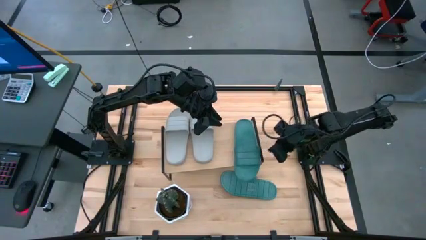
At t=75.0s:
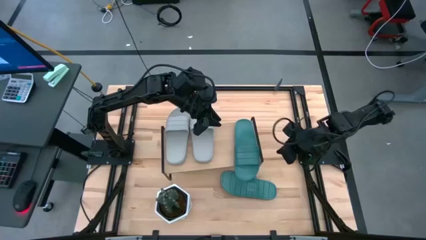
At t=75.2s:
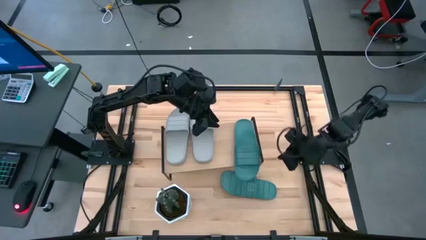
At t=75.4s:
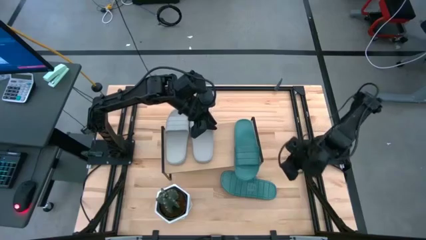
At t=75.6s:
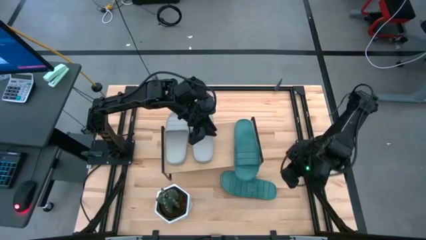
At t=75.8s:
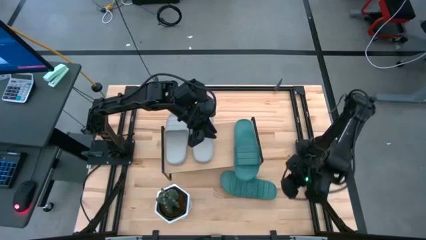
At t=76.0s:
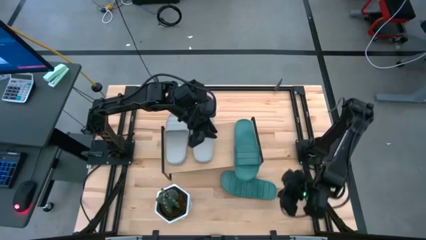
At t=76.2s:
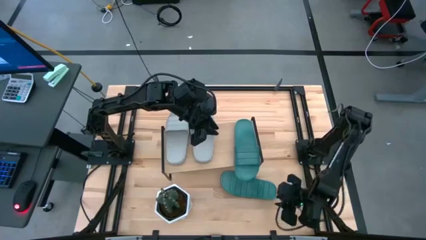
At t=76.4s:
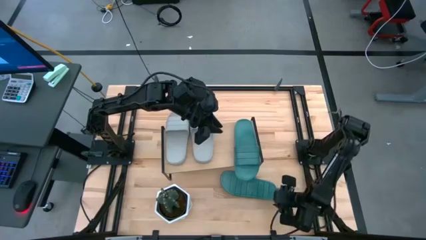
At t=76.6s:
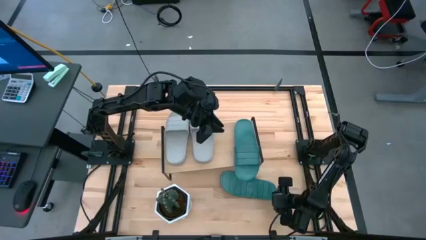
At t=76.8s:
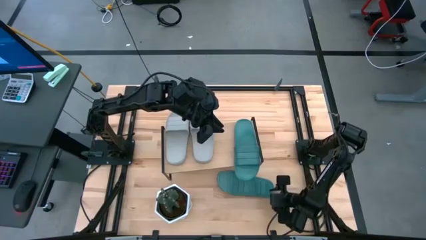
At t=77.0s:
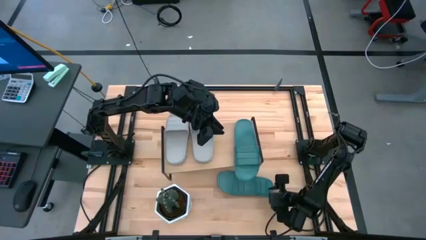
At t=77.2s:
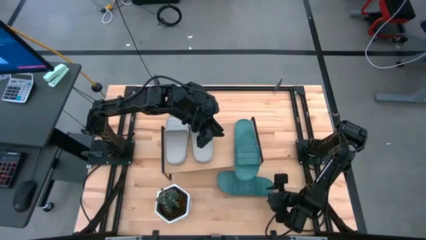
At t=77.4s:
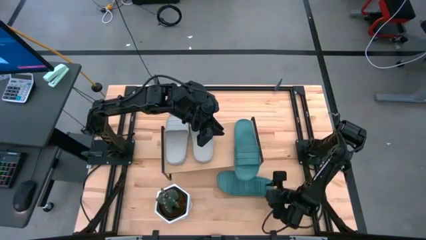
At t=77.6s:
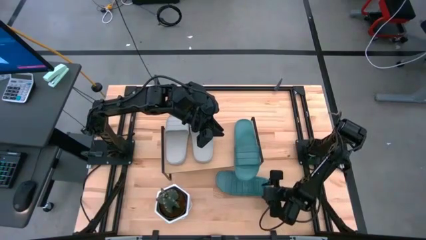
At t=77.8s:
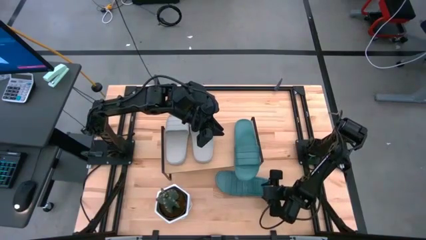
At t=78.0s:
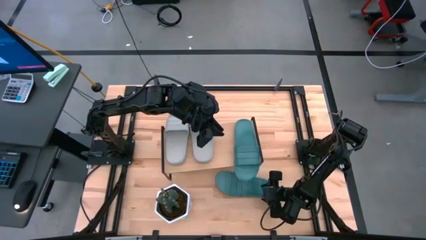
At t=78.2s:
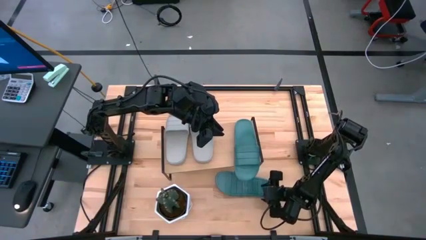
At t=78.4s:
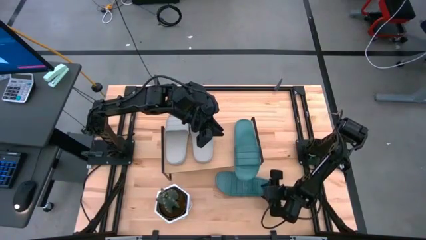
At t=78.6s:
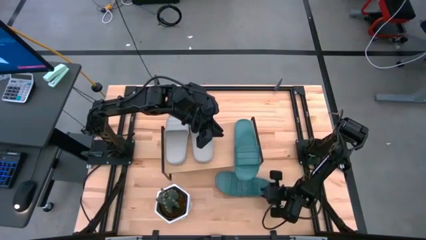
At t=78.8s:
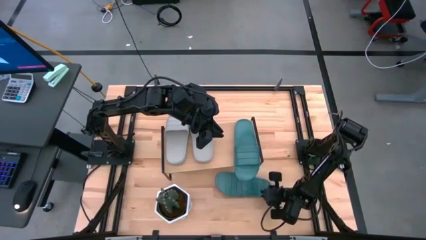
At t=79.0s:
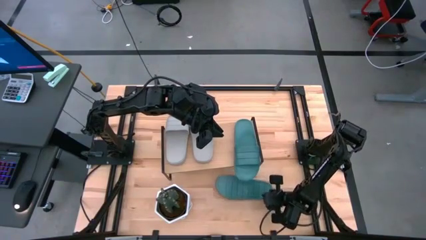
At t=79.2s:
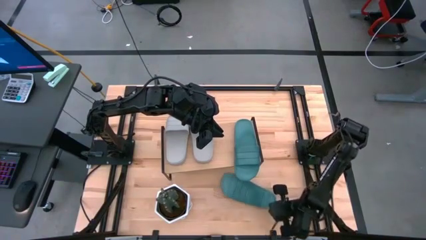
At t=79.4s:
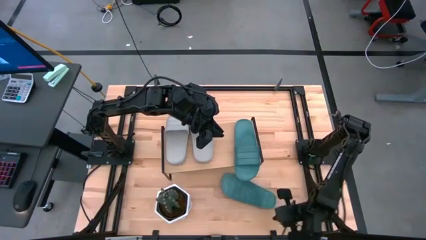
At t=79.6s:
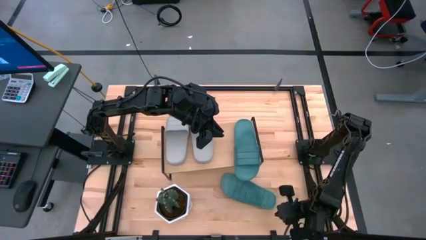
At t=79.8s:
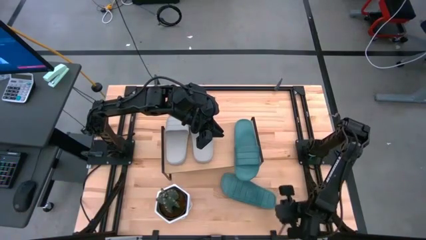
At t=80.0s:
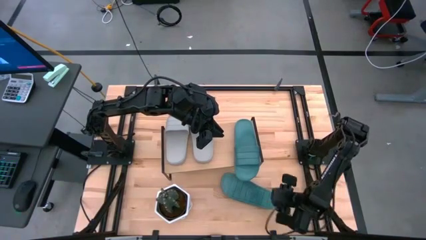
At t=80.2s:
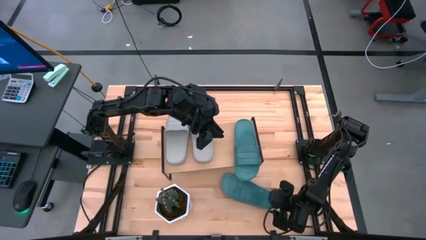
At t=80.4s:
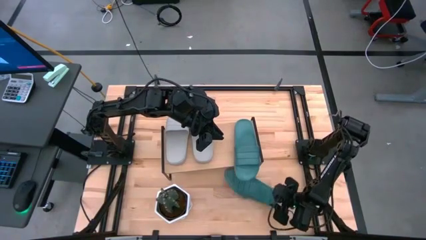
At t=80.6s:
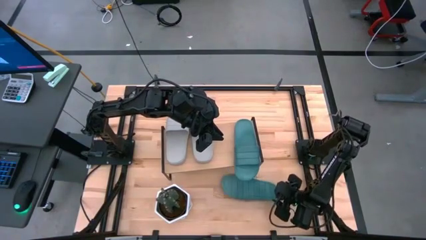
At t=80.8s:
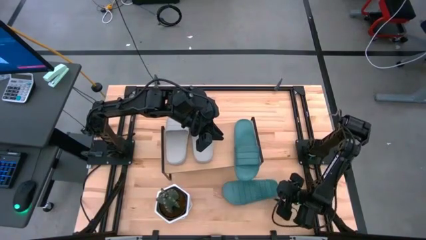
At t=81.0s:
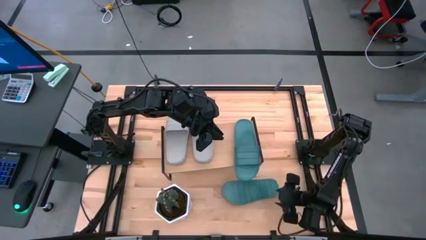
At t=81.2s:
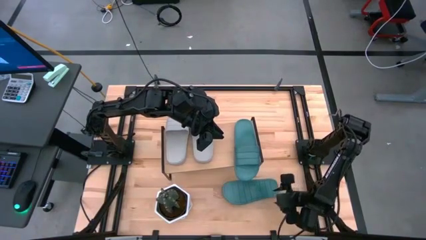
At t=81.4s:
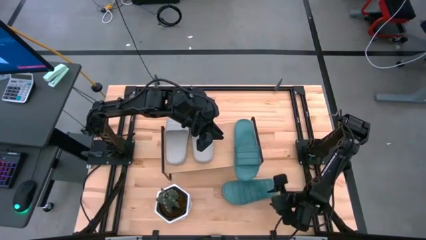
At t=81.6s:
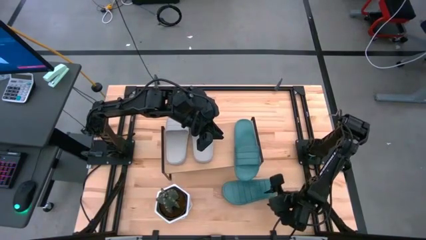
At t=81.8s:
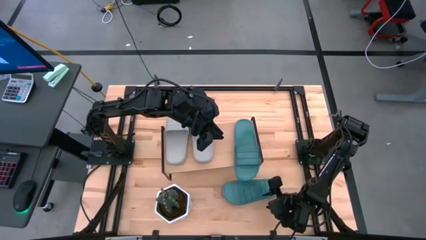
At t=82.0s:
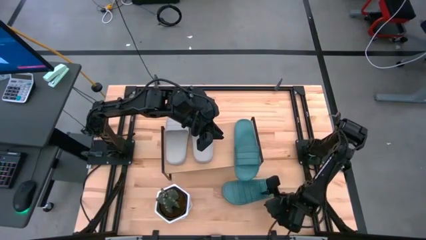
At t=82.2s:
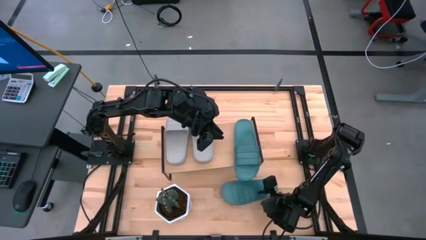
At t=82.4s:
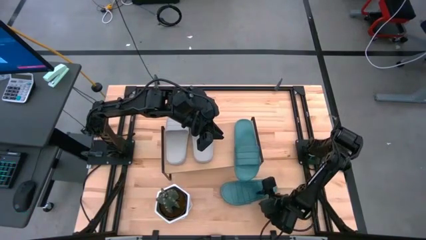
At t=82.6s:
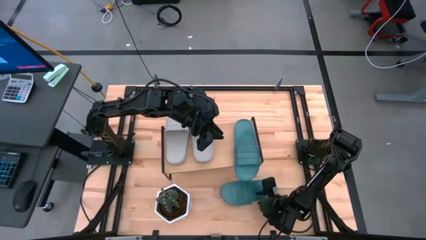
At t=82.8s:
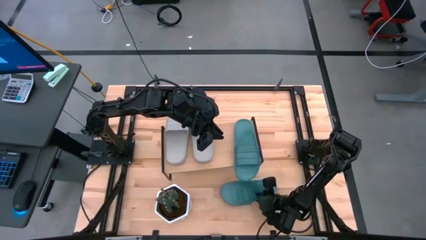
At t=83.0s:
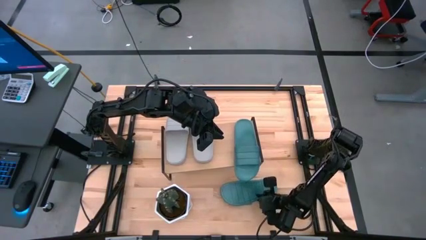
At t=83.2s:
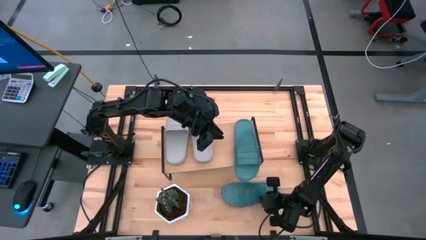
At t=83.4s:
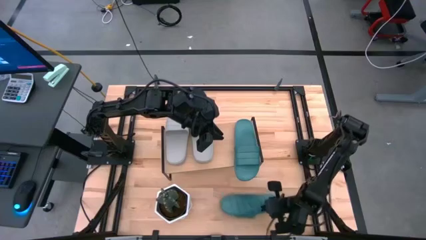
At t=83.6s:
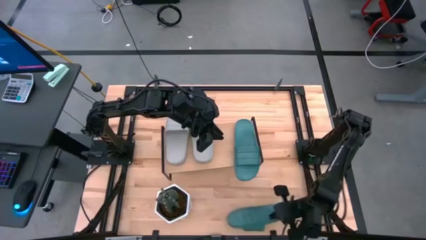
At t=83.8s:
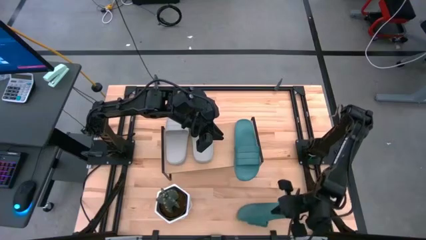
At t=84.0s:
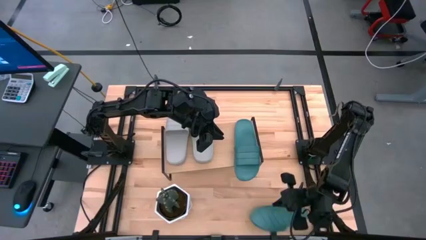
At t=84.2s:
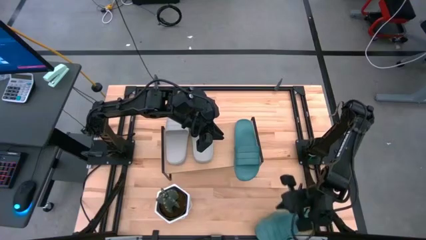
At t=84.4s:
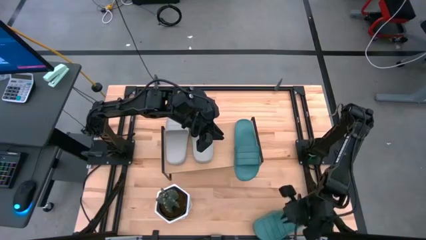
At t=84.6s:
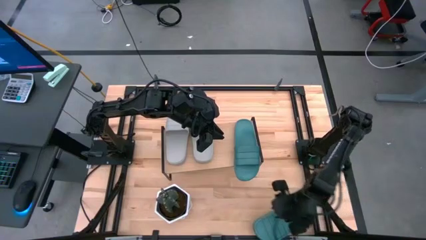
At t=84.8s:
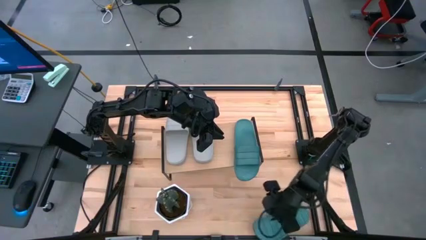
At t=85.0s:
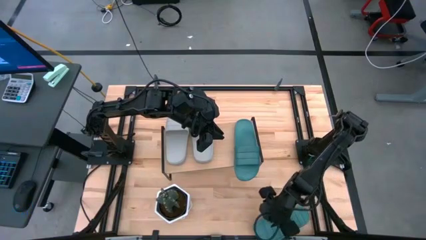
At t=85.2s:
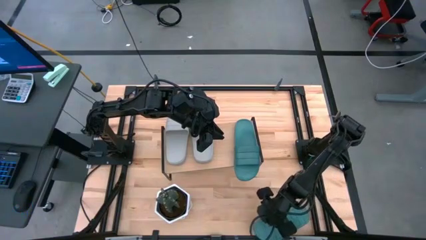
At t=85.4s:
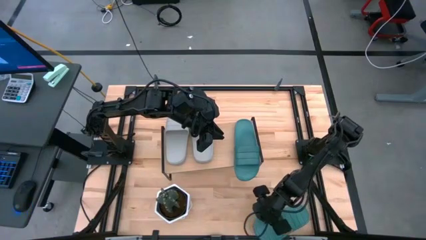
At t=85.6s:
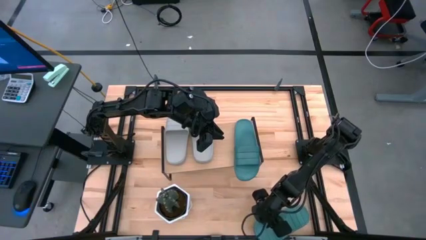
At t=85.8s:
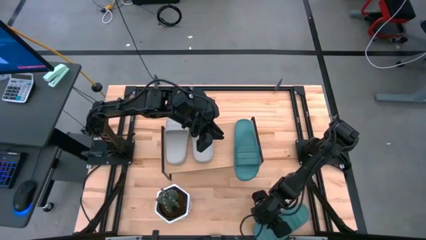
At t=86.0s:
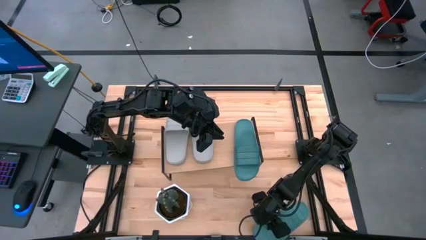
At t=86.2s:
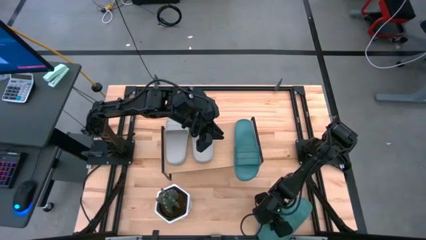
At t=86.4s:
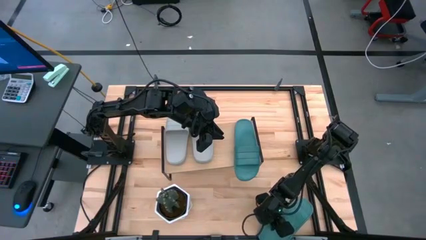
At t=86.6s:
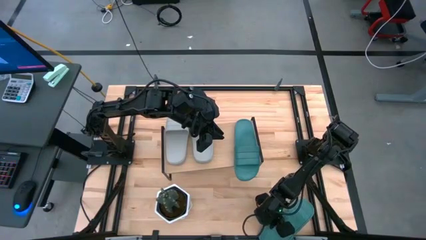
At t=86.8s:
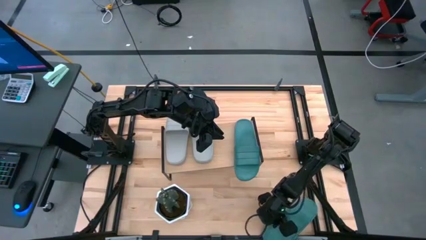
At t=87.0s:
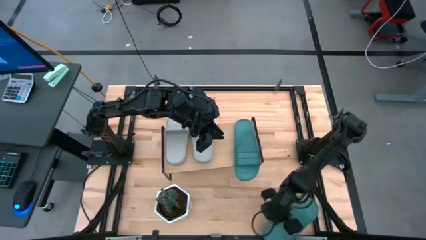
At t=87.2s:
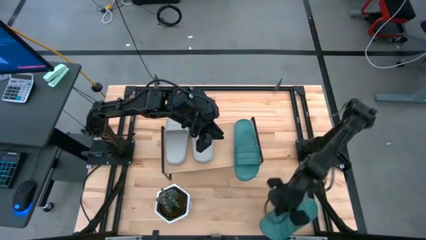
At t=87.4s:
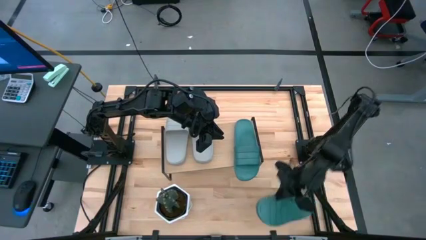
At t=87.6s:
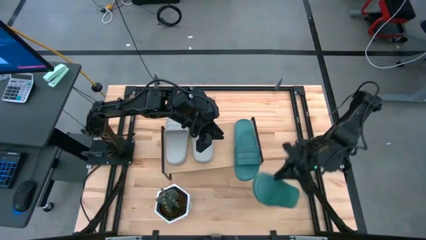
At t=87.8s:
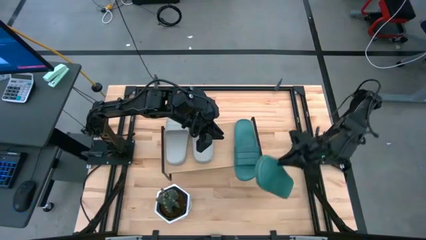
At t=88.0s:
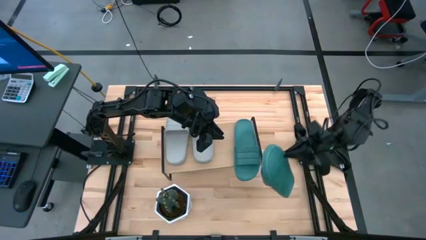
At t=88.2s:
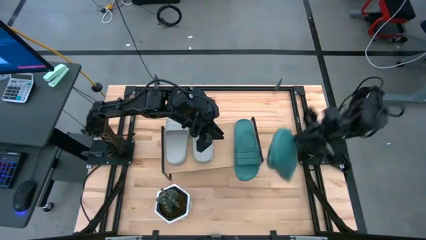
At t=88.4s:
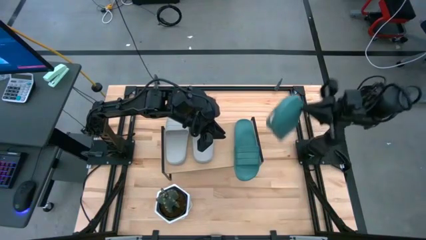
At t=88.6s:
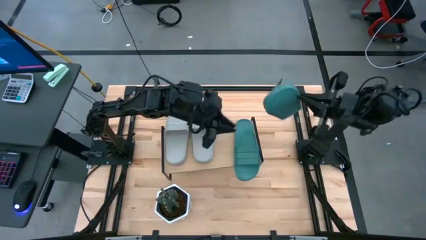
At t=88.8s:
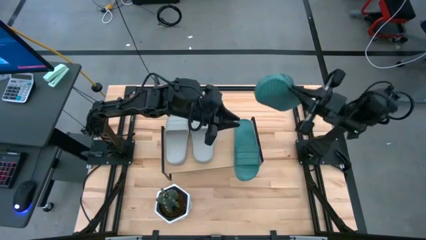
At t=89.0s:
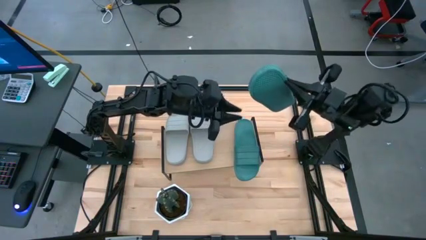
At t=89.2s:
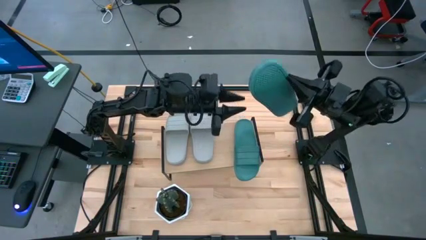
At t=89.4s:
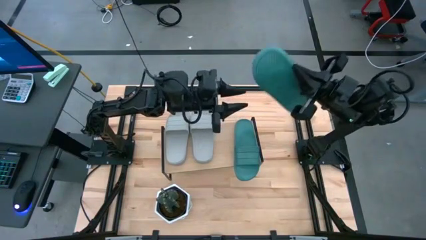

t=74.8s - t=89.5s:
Task: Pick and place slides into the shelf
Put the green slide on the shelf
